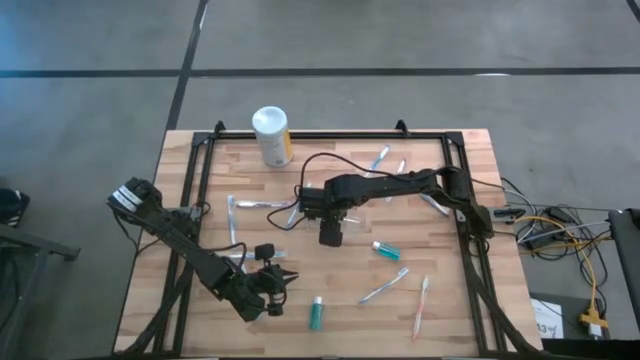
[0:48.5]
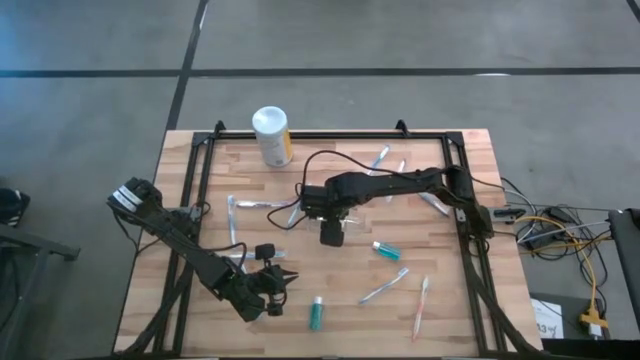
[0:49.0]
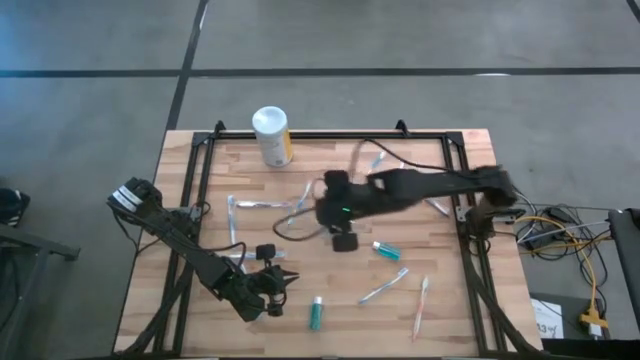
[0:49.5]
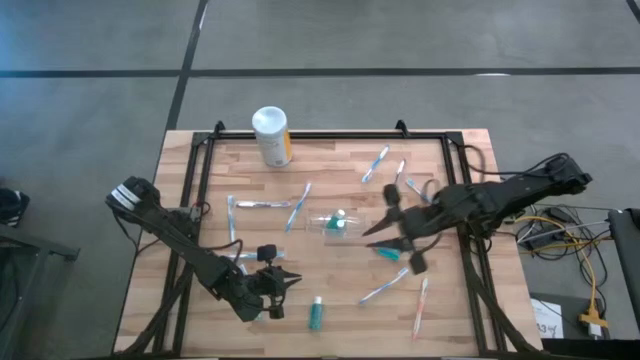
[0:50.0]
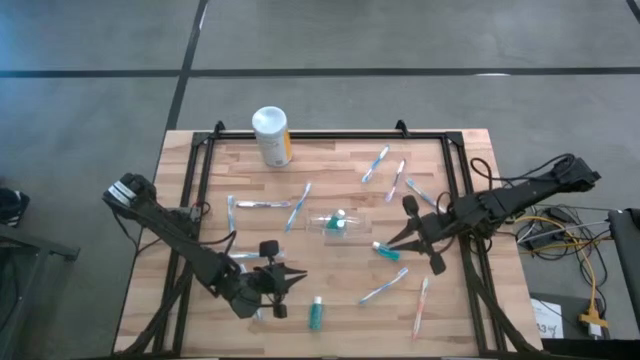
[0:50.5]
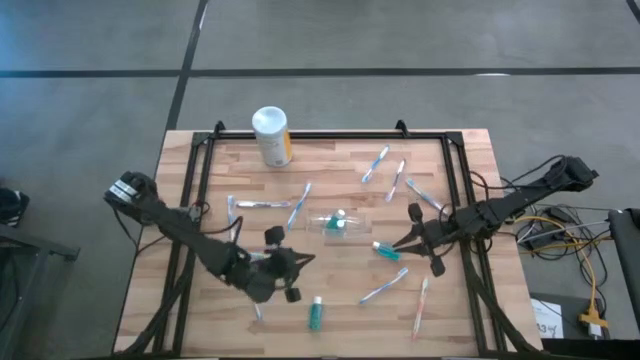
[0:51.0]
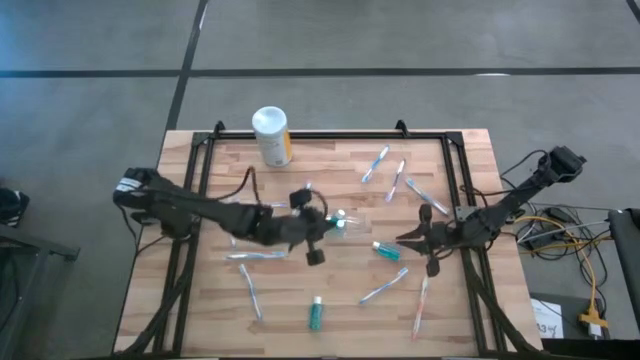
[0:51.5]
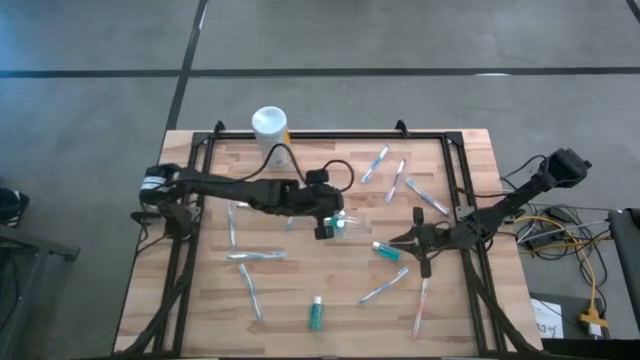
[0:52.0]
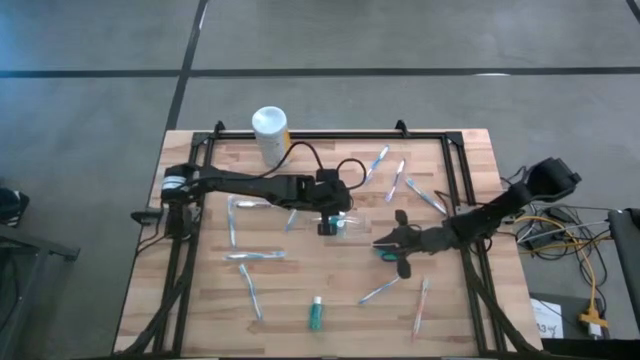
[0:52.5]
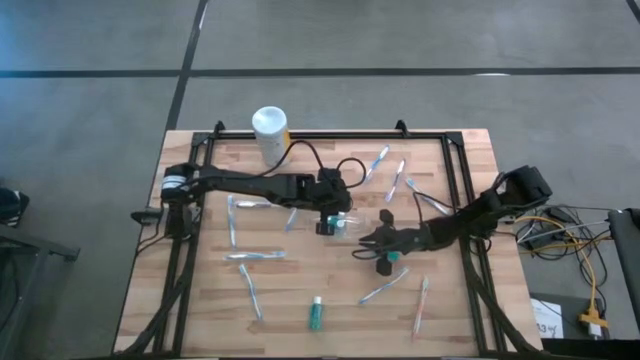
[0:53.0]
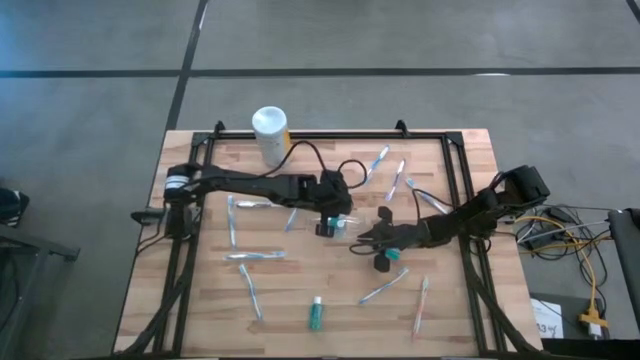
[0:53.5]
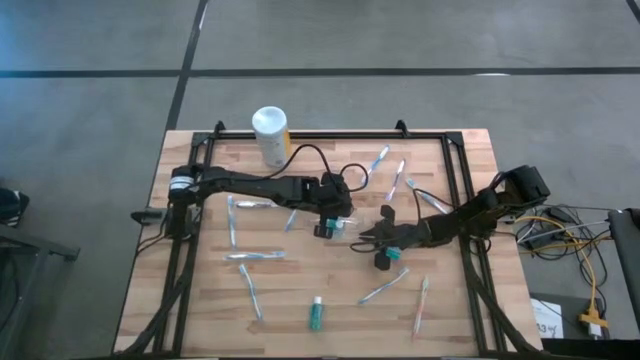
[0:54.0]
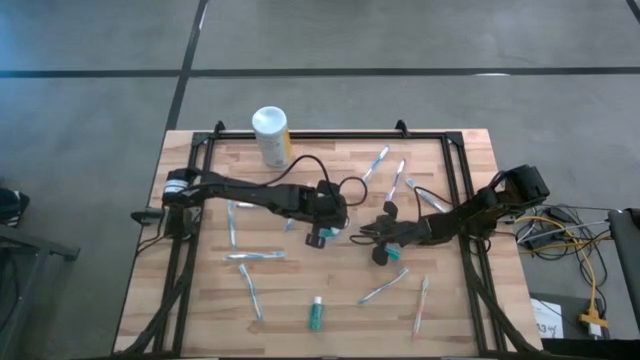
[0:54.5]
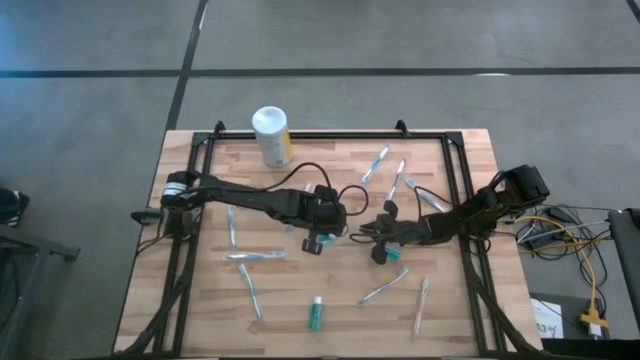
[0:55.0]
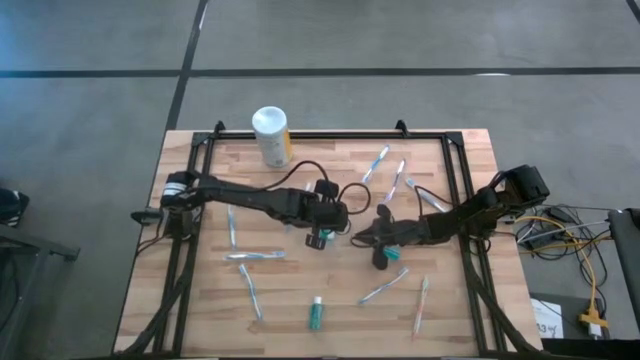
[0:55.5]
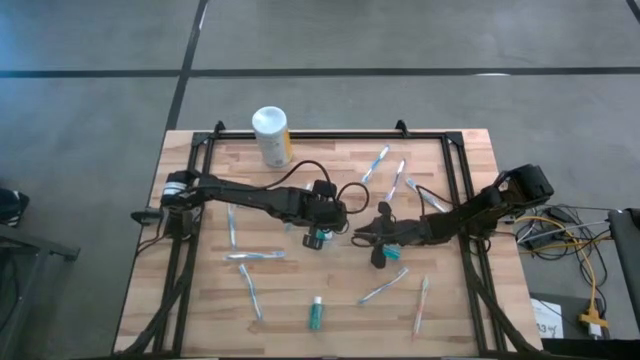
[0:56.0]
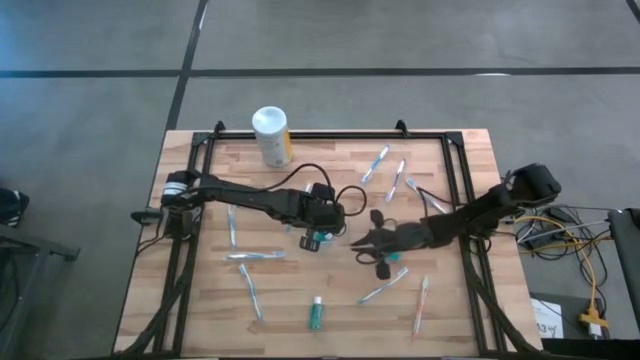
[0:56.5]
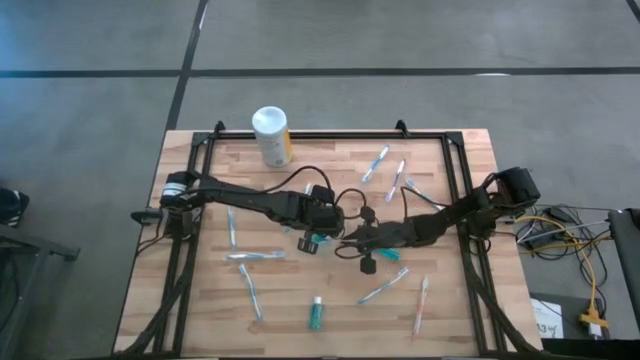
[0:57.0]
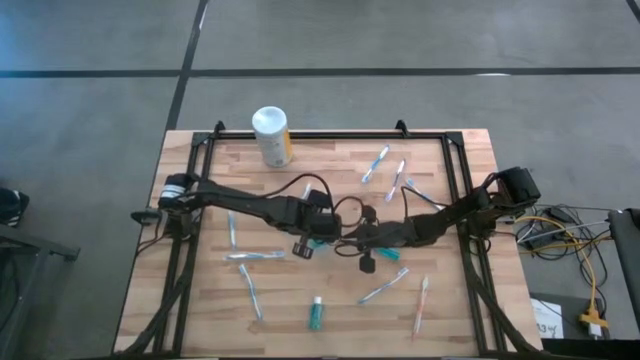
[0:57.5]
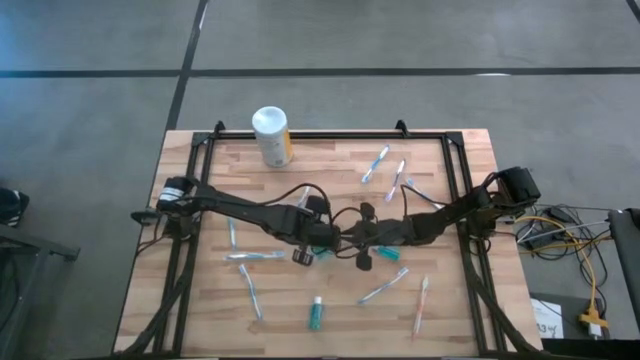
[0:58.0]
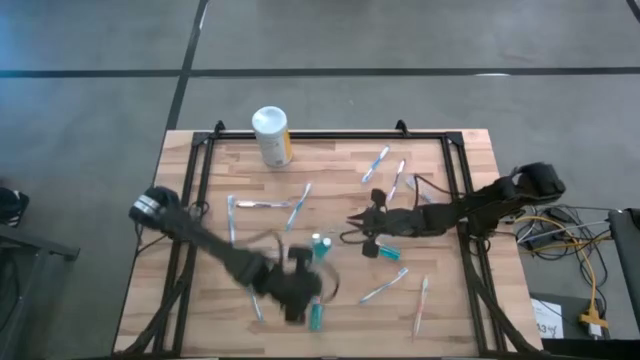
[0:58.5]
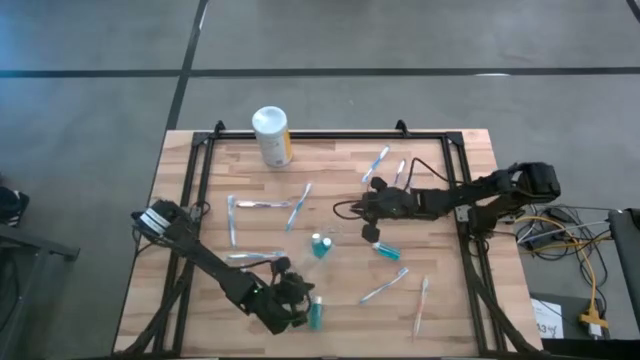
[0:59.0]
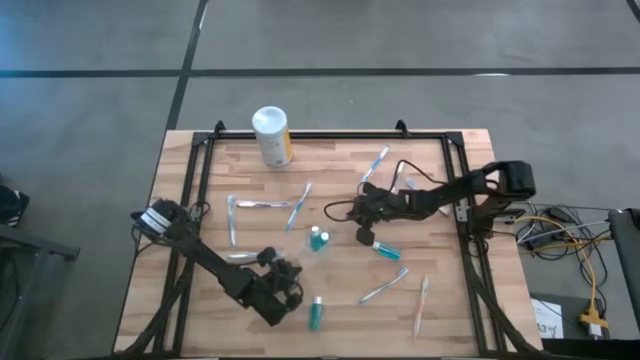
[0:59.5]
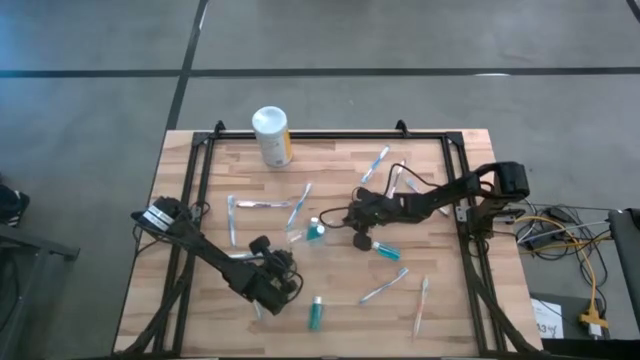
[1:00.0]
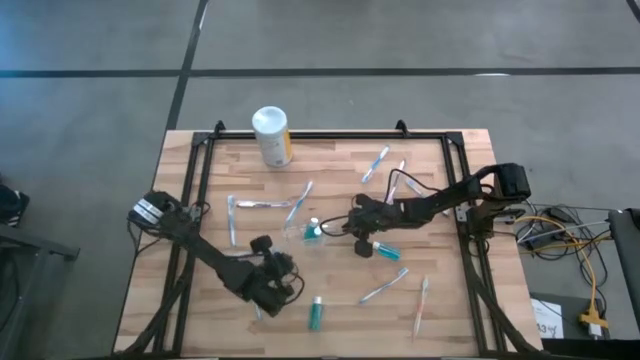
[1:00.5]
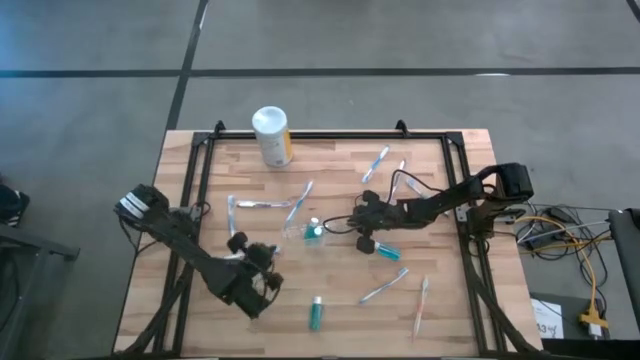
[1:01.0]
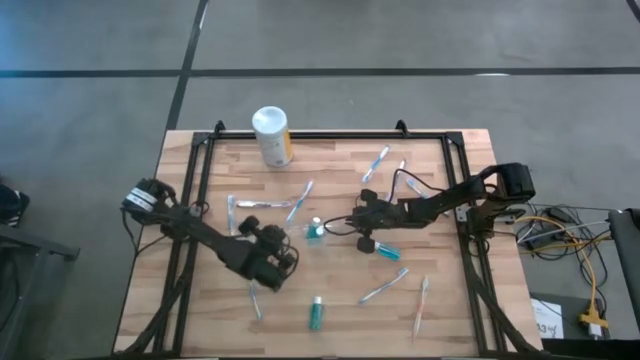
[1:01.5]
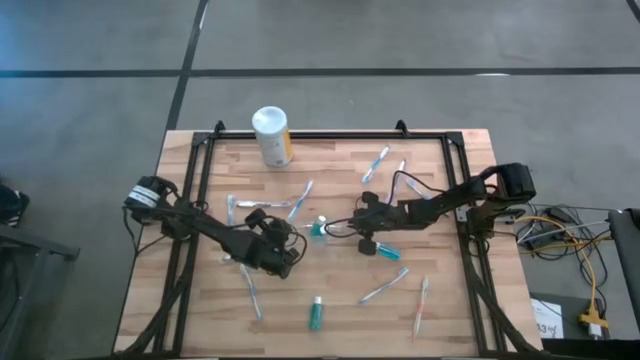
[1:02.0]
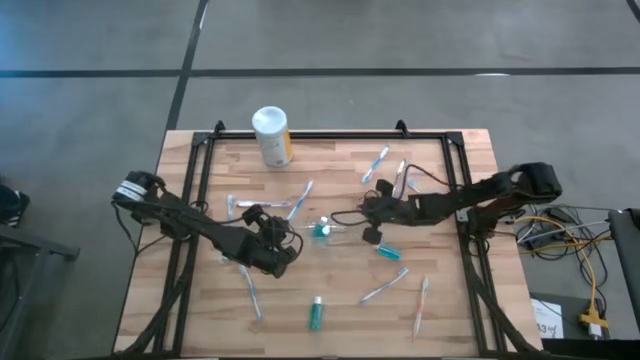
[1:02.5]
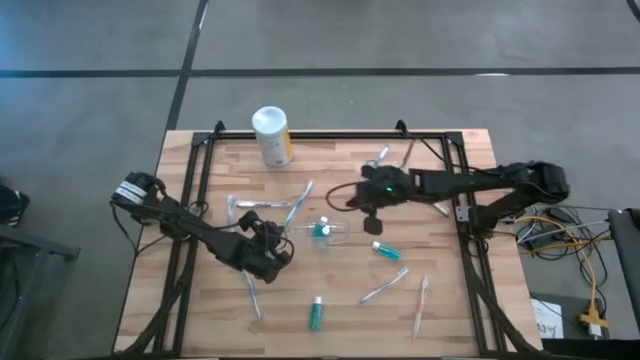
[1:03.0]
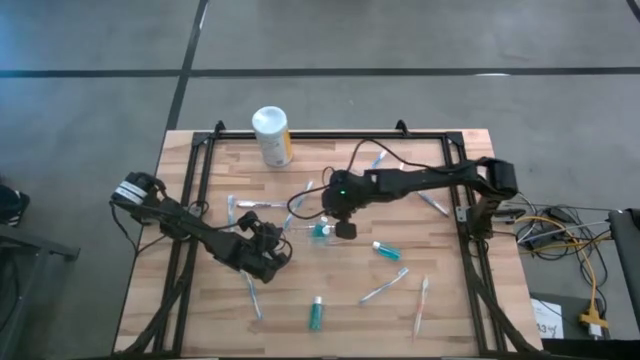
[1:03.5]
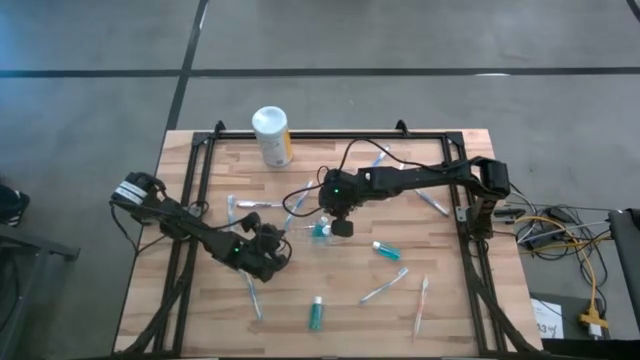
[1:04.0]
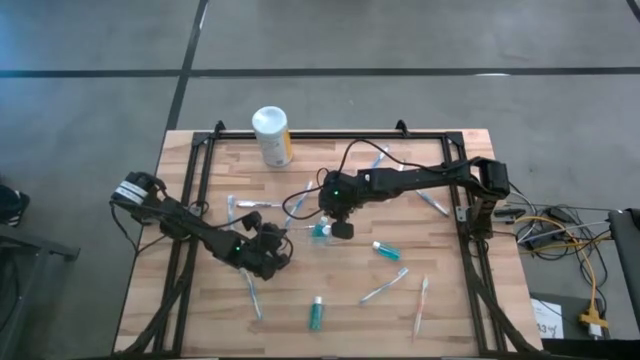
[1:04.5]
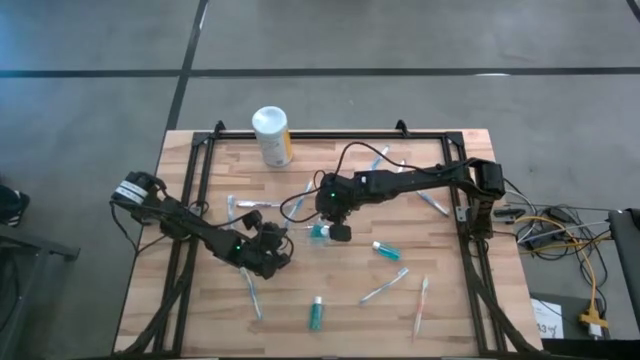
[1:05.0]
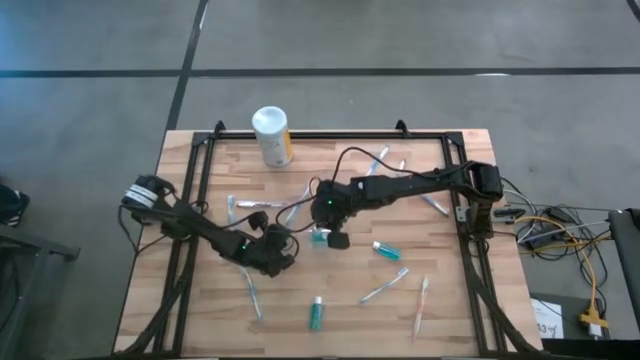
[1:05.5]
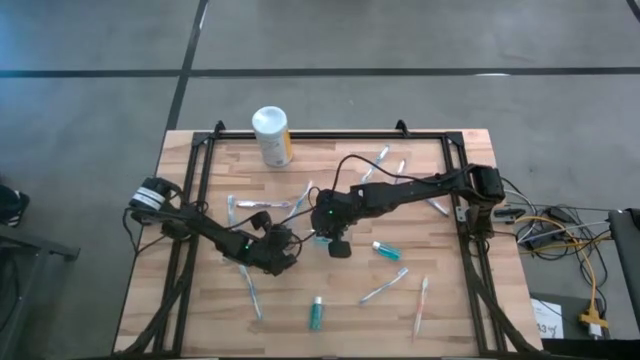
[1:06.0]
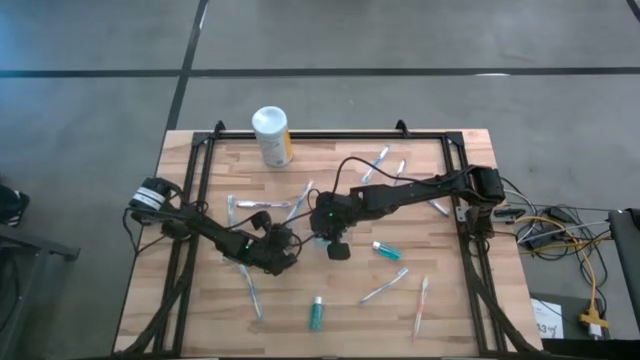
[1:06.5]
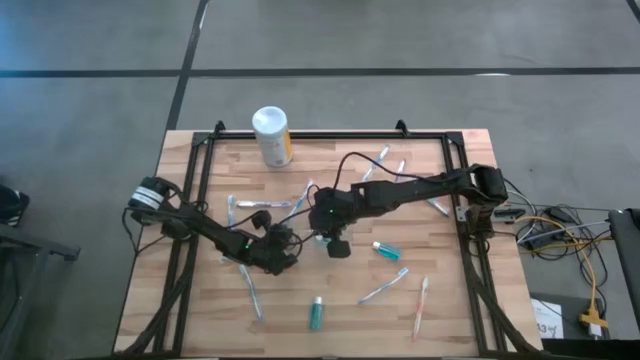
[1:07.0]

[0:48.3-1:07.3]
Task: Pick & Place toothbrushing station
Adjust the transparent organizer

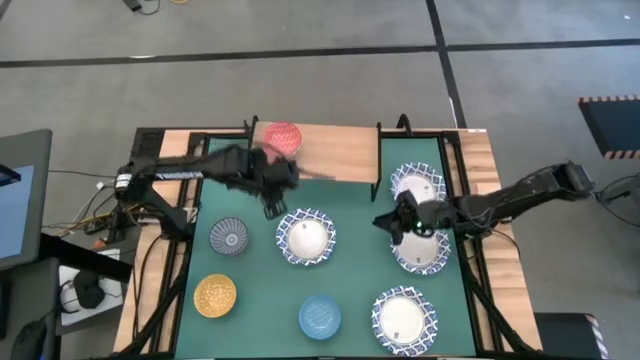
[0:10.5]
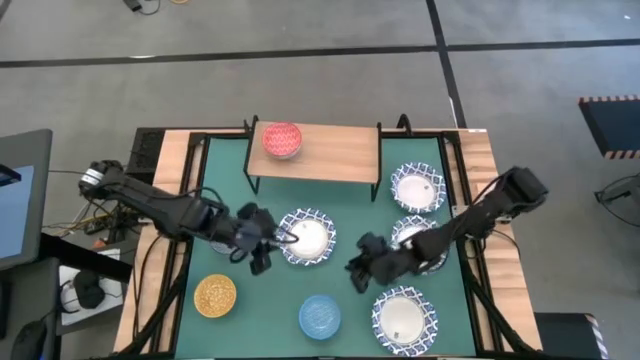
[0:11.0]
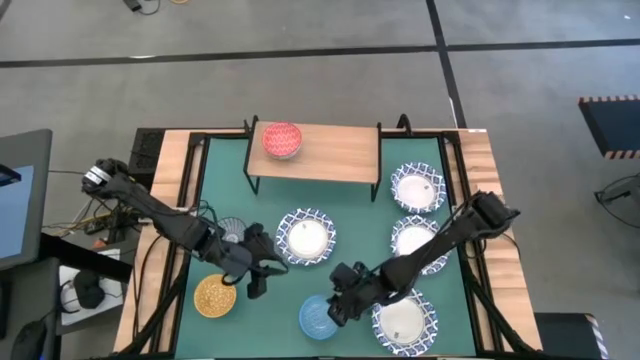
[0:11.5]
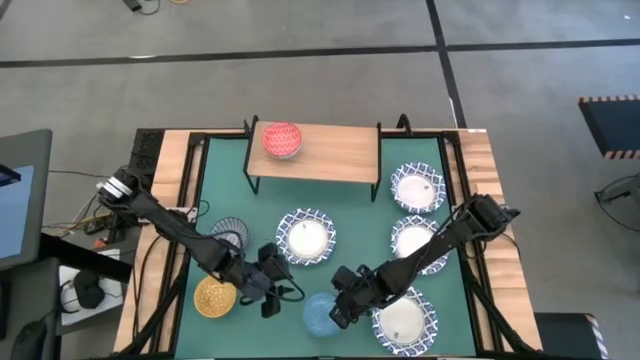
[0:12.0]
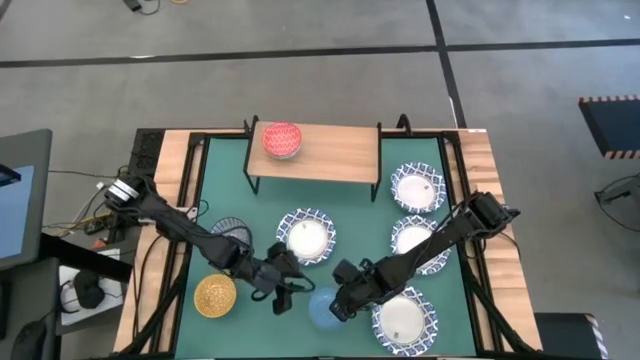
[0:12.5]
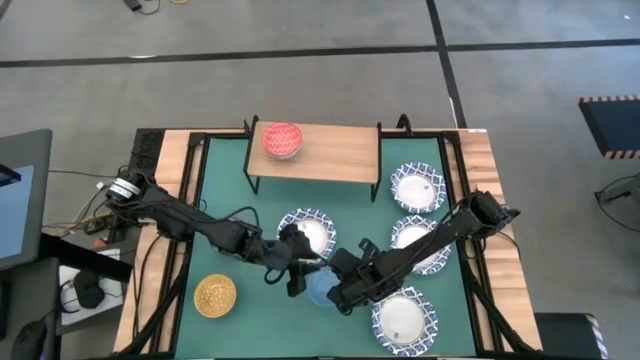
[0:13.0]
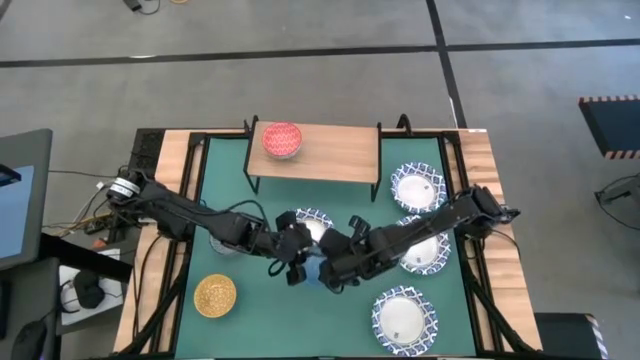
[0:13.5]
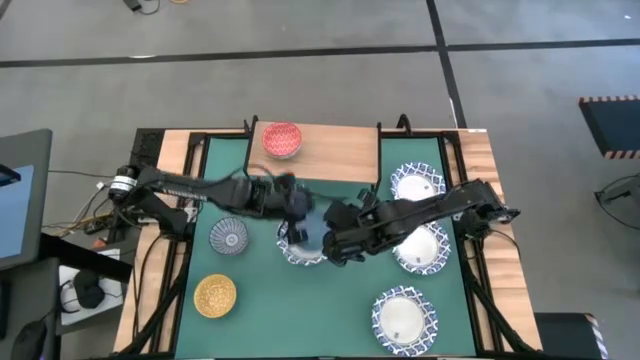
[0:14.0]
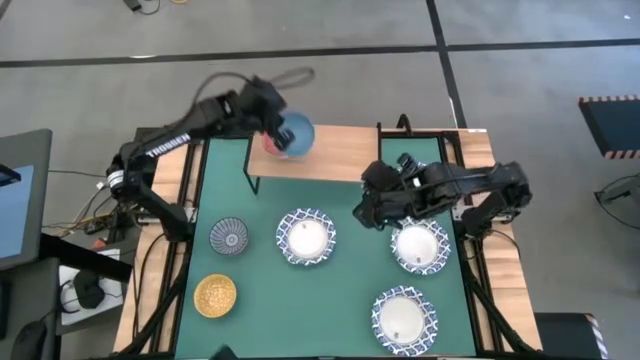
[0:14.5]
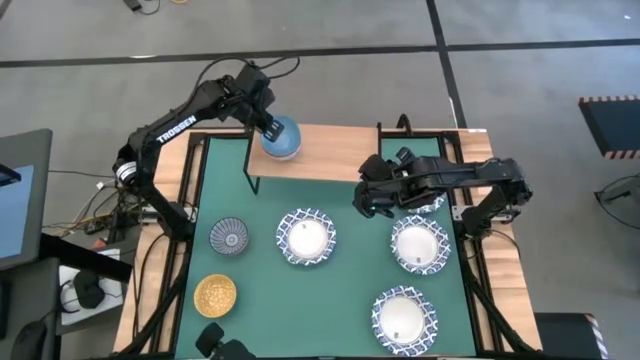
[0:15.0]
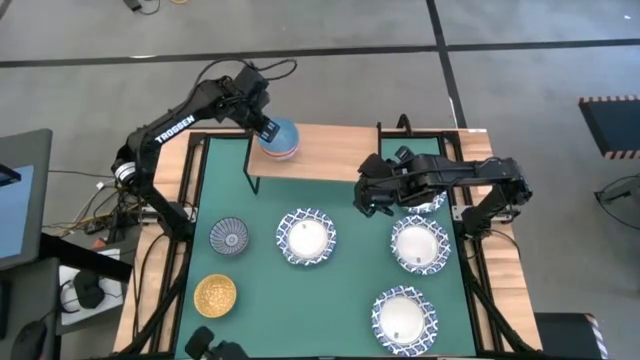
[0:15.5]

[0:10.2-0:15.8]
Task: Place and stack bowls onto a shelf
Stack the light blue patterned bowl on top of the red patterned bowl on the shelf
